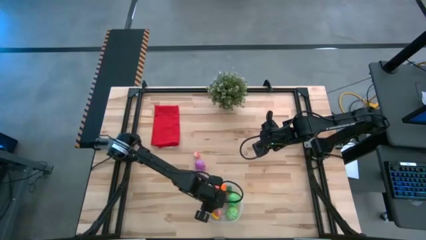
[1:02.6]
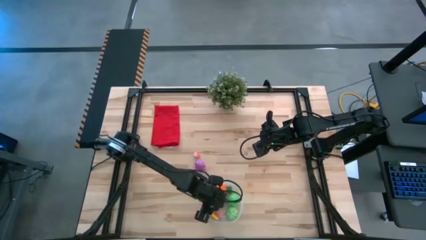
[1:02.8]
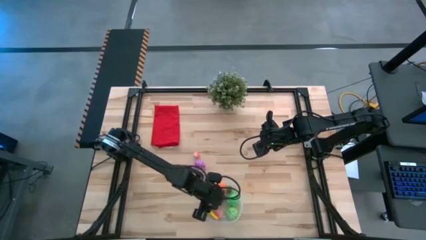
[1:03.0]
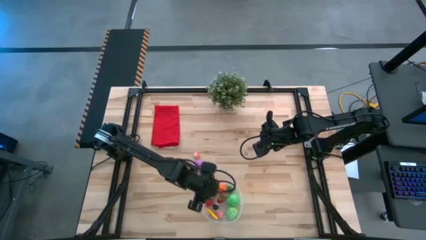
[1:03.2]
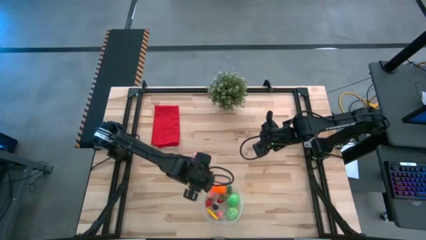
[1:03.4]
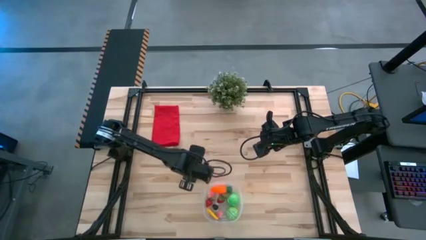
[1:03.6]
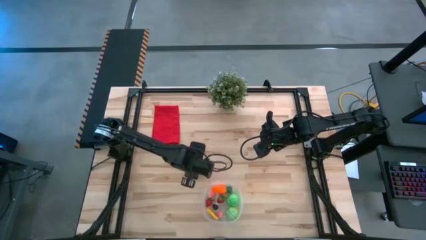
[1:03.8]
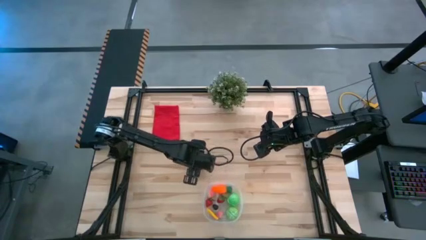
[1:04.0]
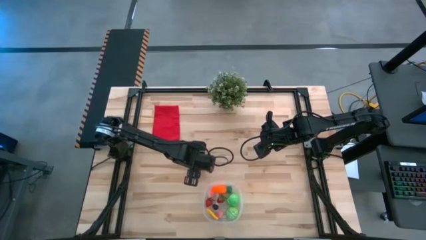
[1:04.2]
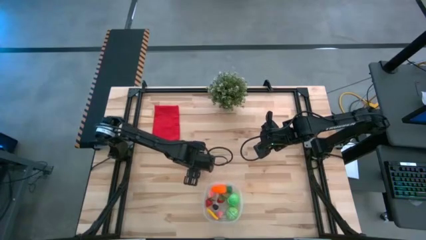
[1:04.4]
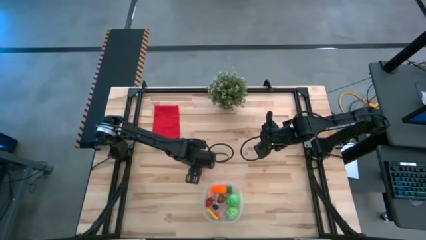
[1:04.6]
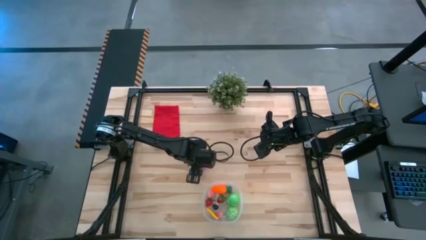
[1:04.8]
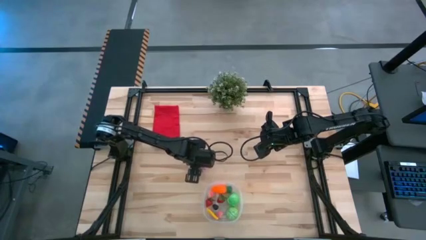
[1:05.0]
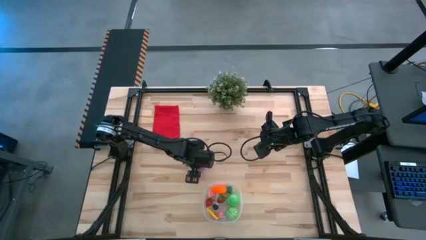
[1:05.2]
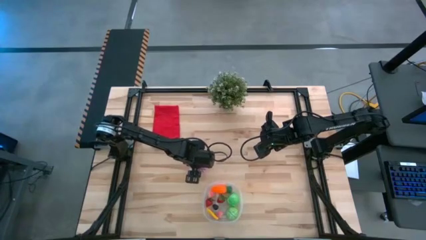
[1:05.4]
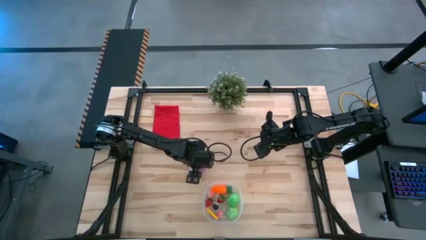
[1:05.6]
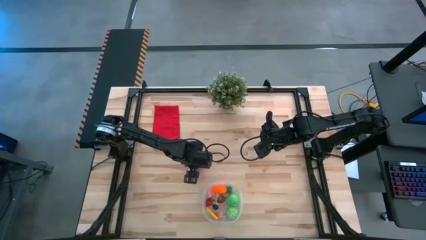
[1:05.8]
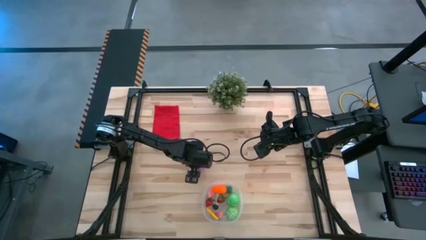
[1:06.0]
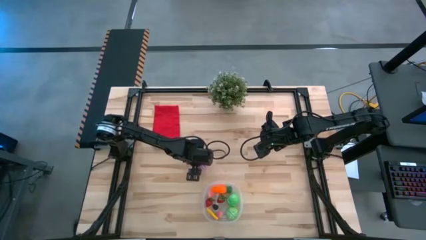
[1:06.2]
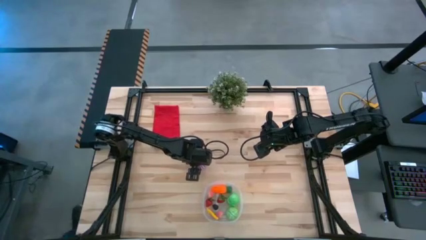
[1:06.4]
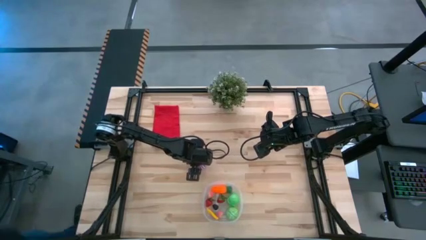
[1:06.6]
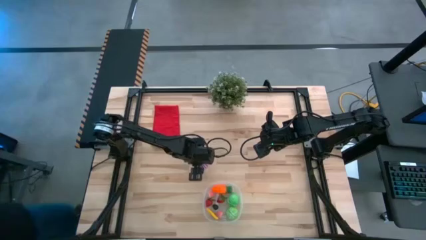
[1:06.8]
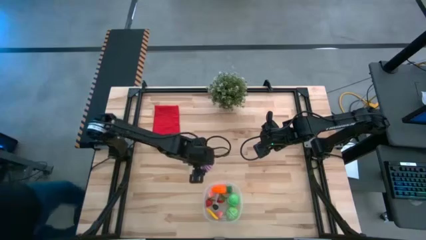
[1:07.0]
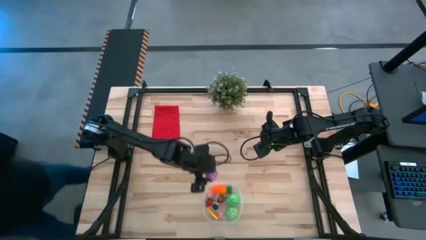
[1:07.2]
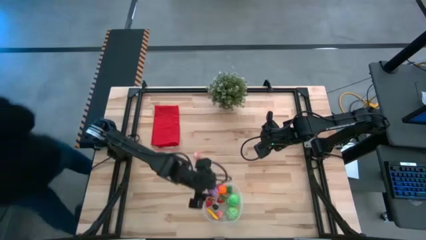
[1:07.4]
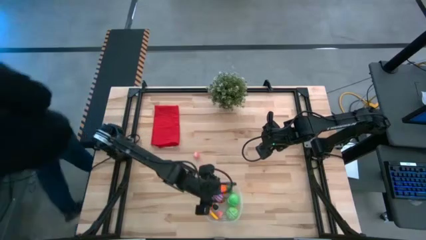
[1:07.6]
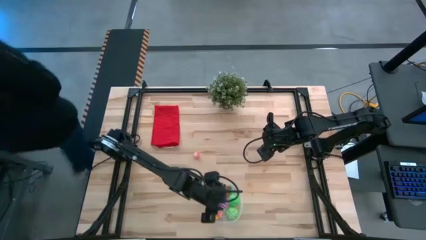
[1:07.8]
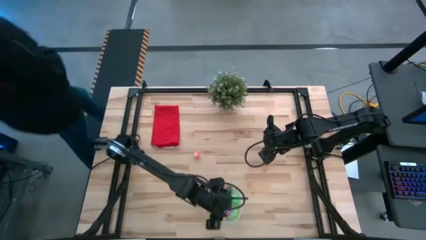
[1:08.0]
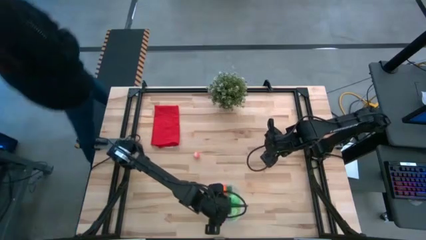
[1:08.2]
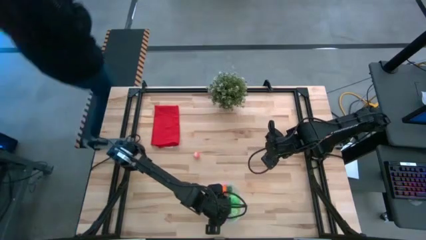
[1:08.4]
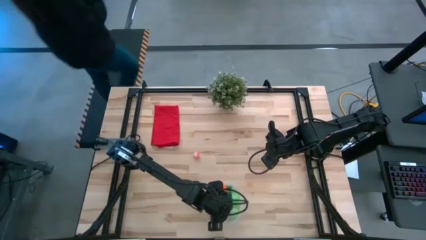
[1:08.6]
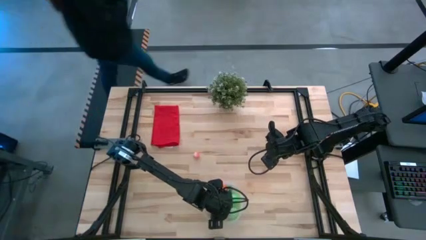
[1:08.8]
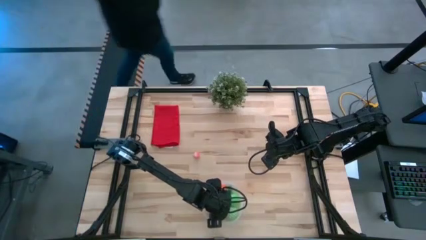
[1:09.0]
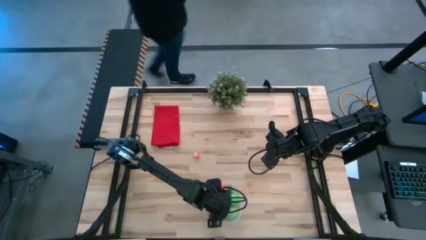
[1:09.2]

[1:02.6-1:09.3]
Task: Pick and placing Produce into tupperware
Put the purple onion into the transparent bin

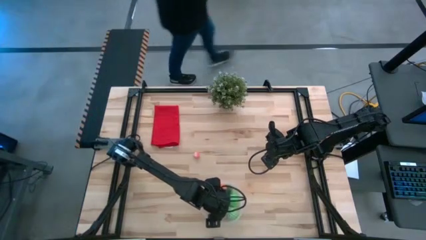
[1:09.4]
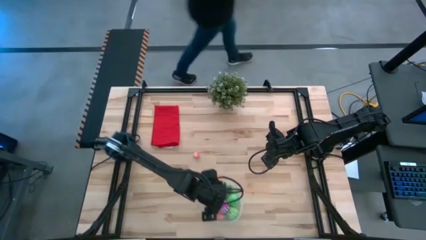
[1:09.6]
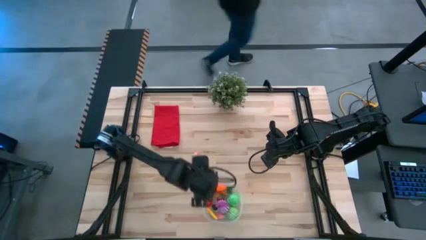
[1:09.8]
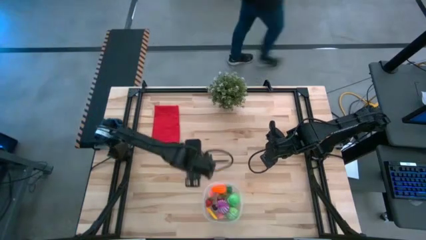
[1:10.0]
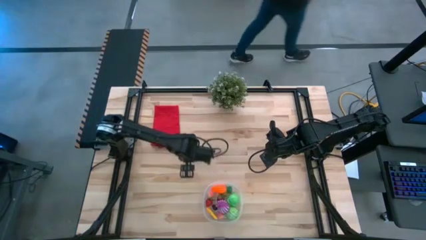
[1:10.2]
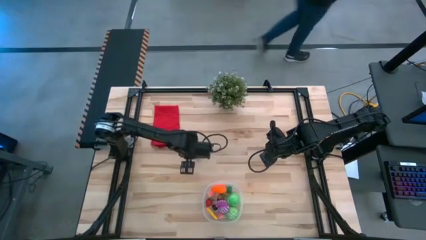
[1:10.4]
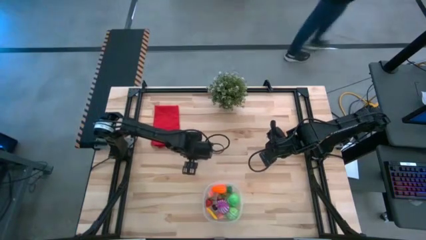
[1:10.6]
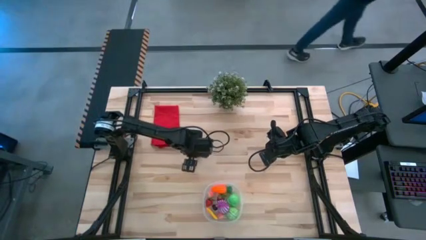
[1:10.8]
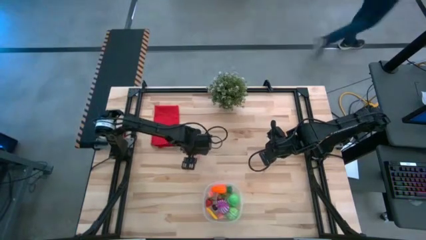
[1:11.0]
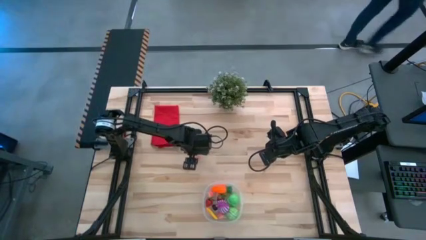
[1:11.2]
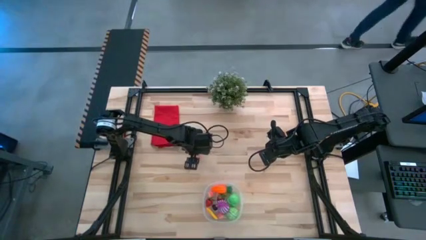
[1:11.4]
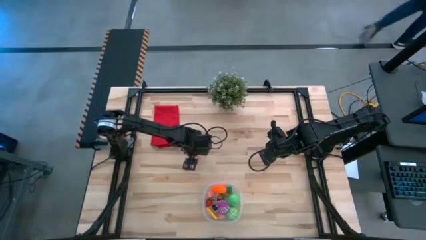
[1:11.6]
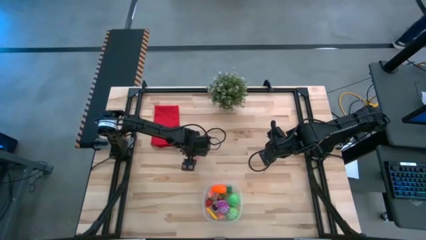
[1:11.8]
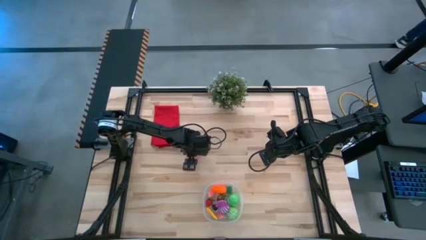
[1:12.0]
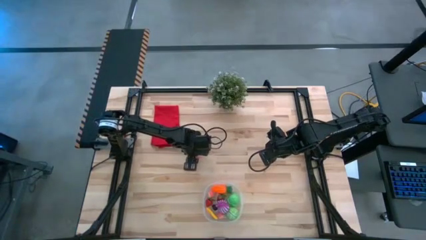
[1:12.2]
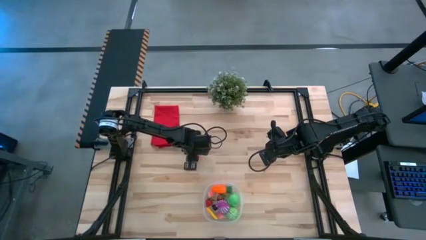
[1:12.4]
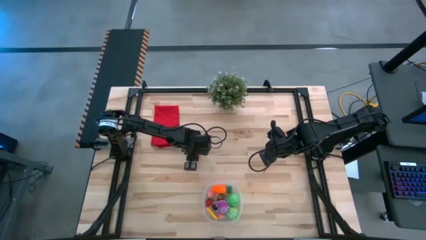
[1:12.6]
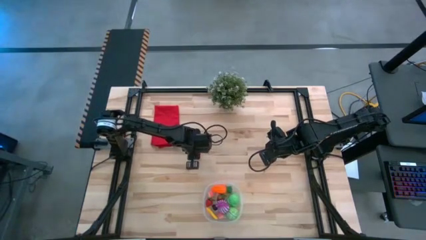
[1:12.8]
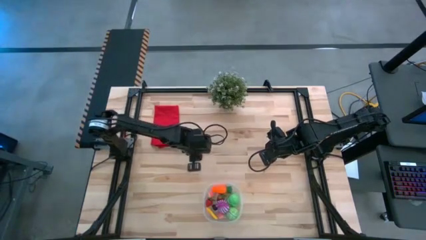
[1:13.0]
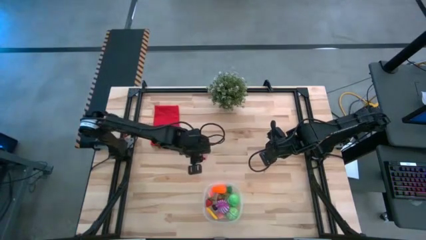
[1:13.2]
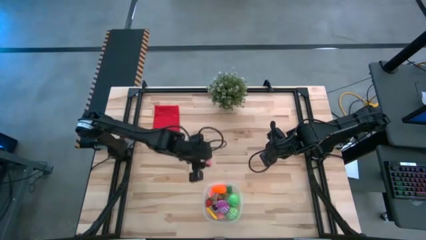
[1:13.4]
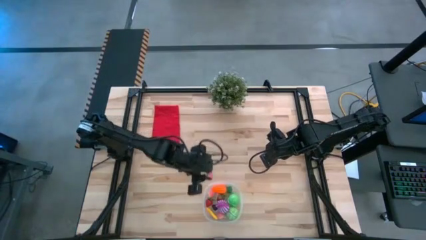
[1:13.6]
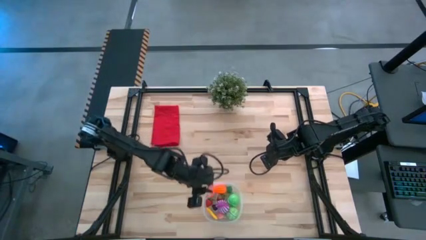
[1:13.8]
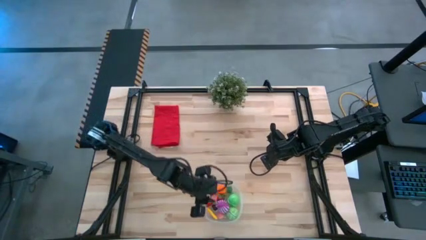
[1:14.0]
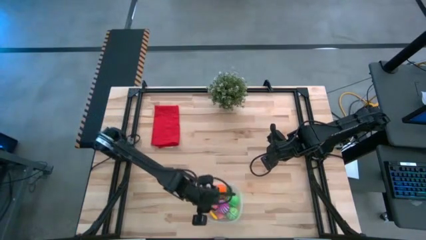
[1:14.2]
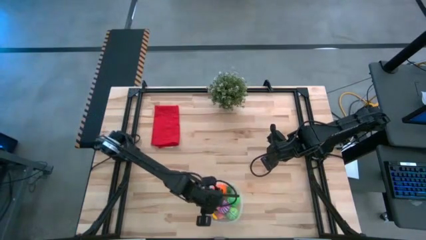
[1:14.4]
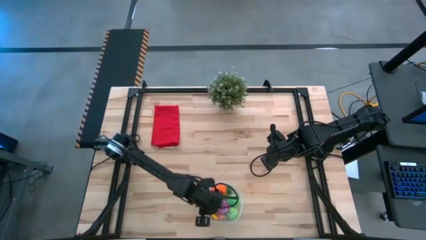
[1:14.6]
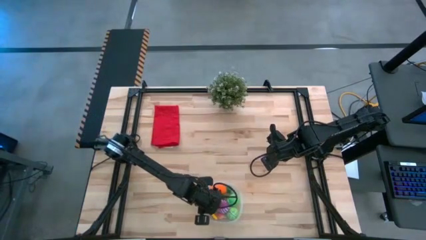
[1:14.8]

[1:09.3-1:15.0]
Put the pink peach into the transparent bin

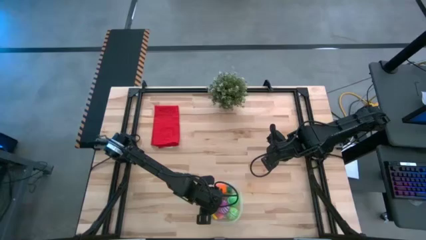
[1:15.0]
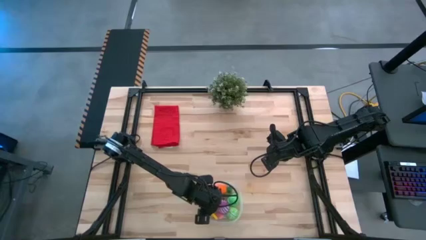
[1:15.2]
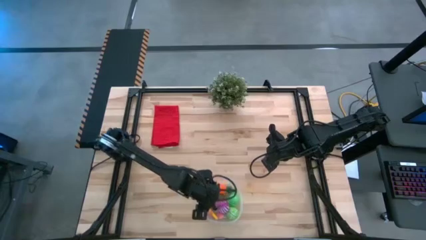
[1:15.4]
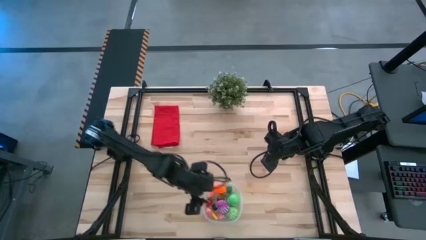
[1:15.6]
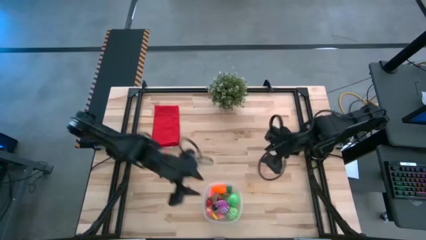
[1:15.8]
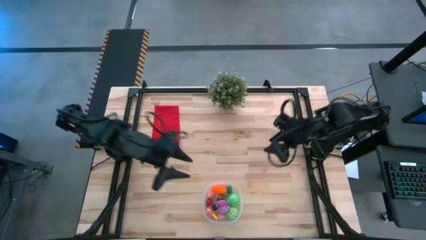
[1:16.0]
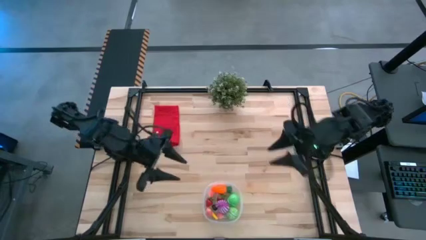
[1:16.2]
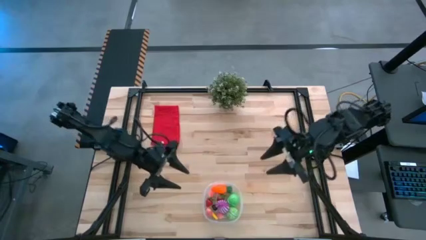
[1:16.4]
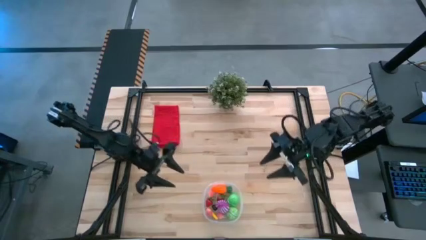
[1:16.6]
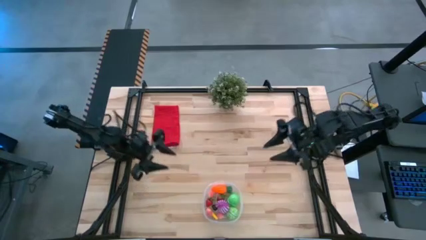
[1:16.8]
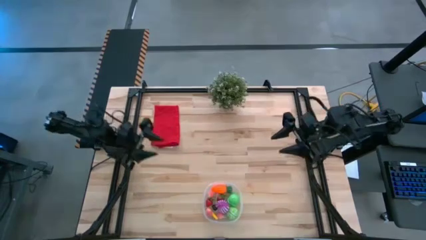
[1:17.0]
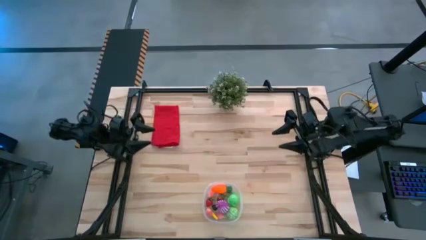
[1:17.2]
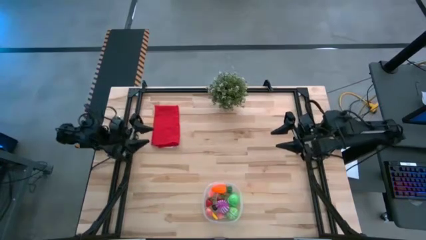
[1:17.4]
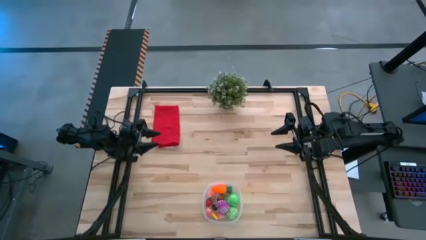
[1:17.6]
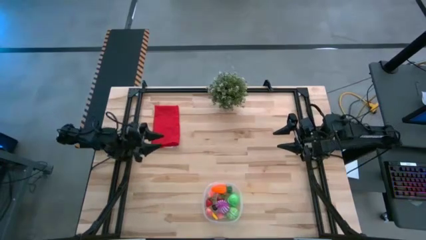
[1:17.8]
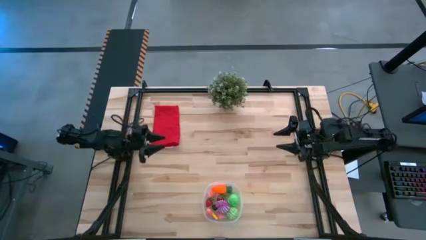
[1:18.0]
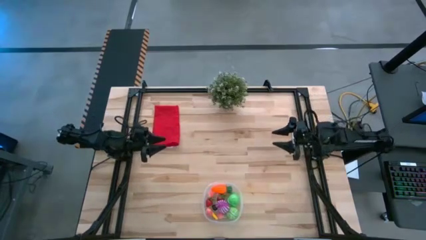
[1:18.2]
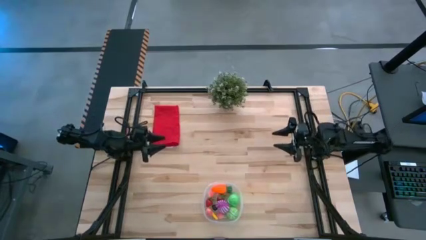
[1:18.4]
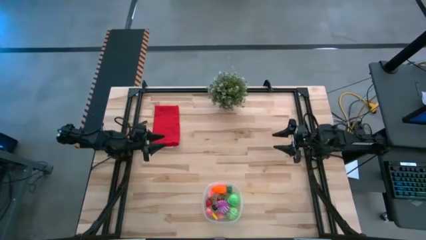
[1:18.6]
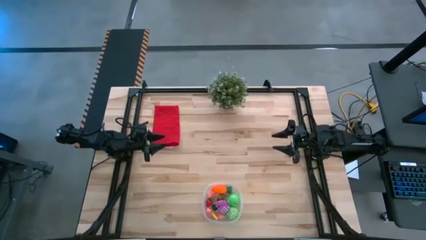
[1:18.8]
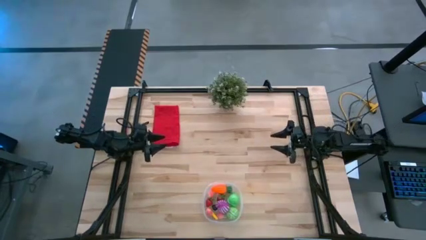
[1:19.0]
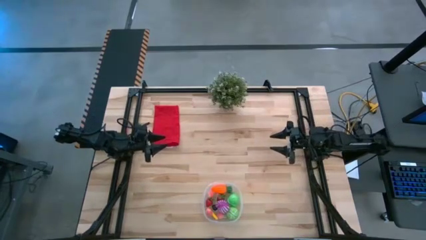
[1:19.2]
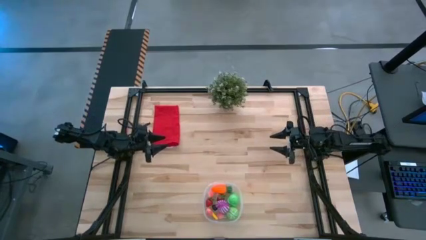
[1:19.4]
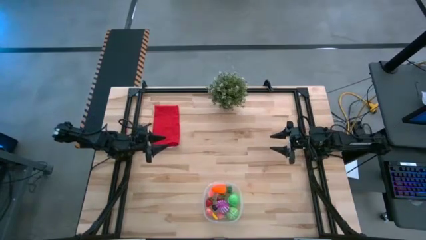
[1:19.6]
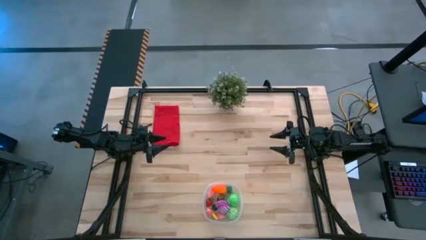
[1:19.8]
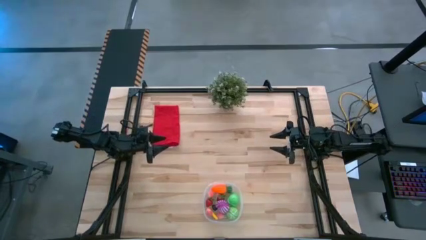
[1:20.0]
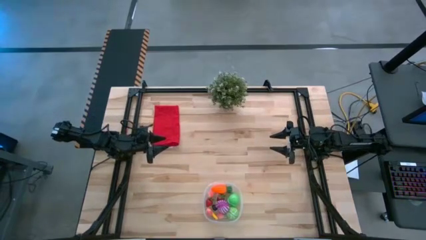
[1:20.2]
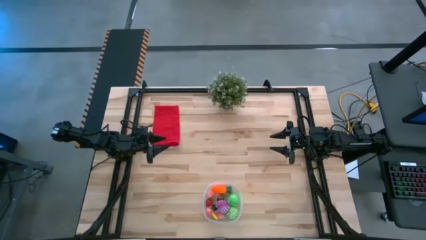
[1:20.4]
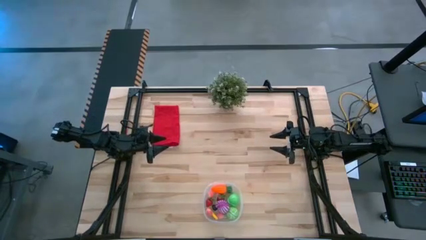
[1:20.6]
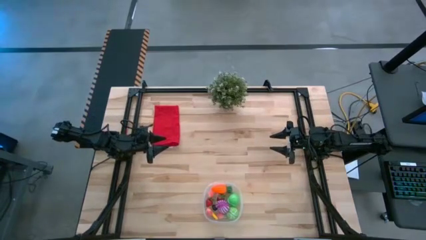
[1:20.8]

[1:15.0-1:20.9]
Return to Home Position
